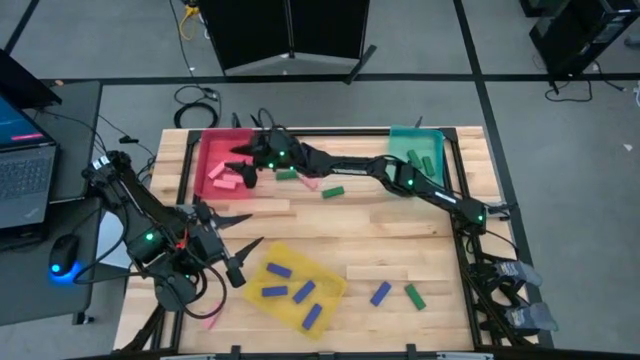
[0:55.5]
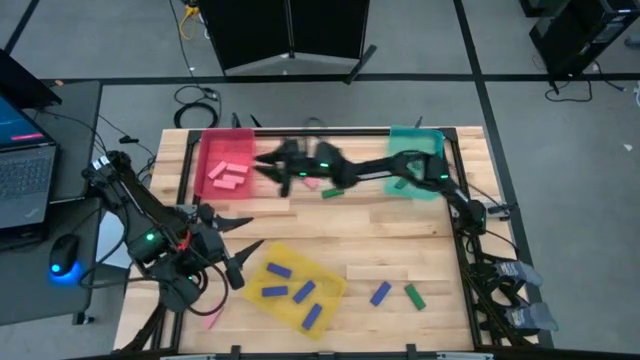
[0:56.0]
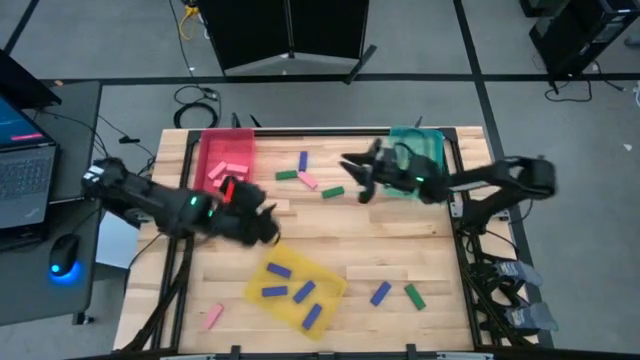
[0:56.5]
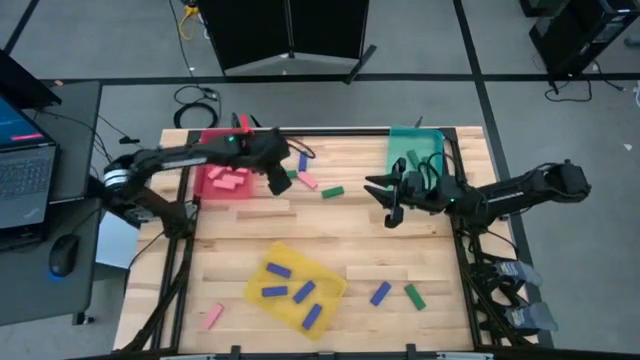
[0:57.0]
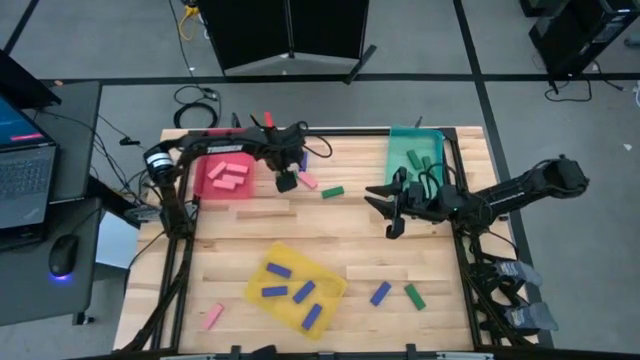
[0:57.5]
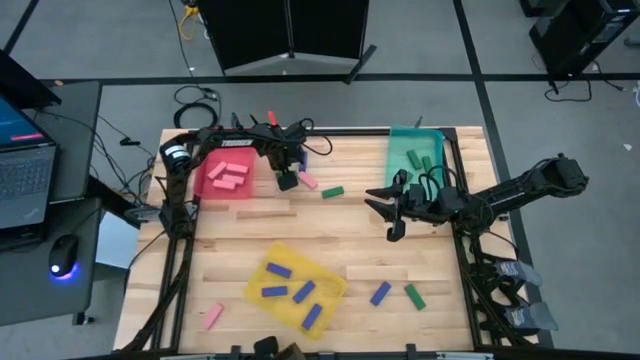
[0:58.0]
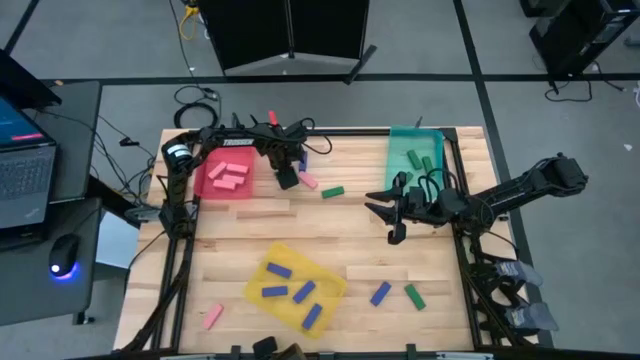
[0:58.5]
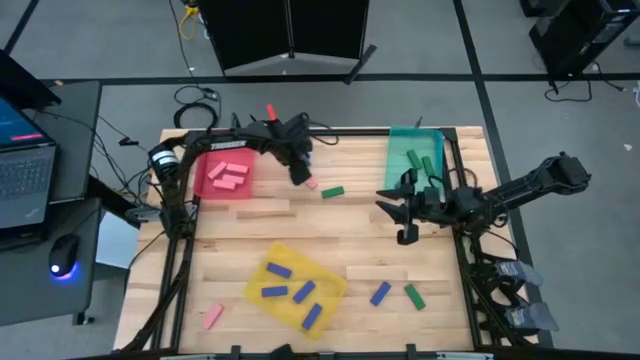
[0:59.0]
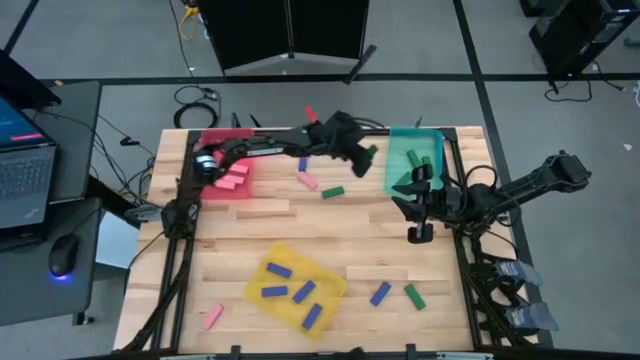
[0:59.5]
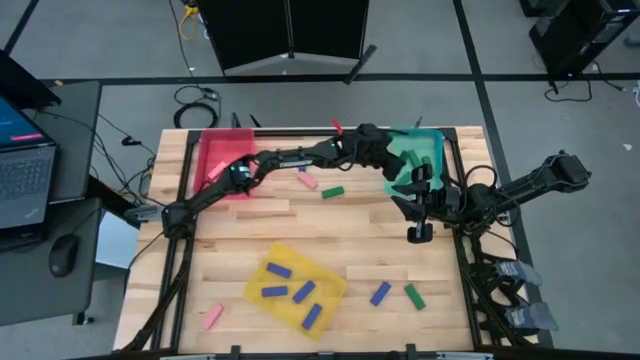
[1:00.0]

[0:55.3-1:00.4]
Task: Sort blocks
Put the green block into the blue bin

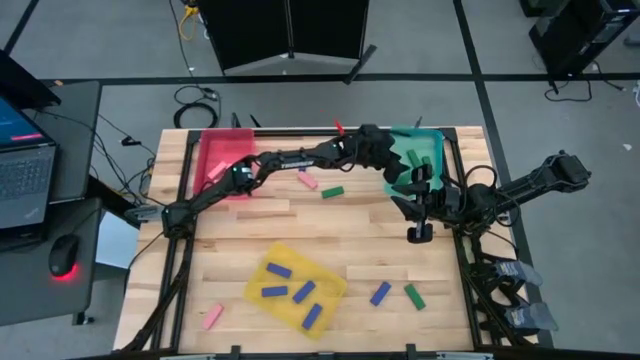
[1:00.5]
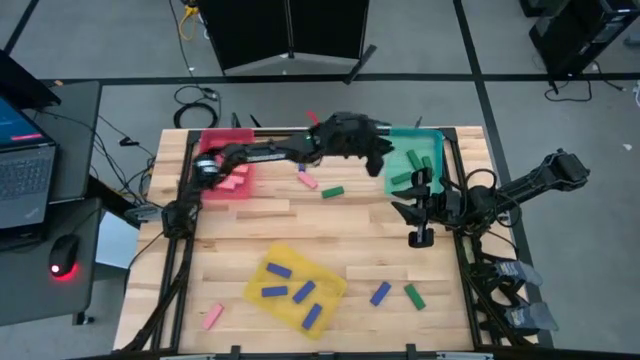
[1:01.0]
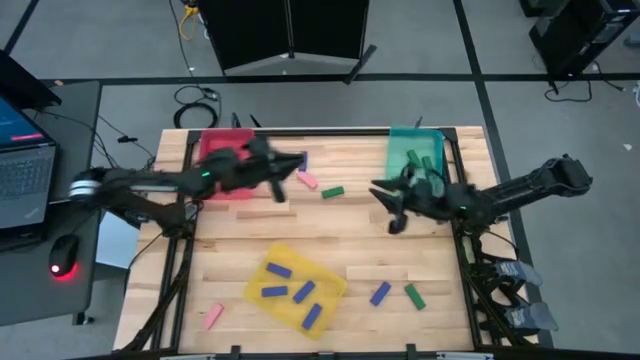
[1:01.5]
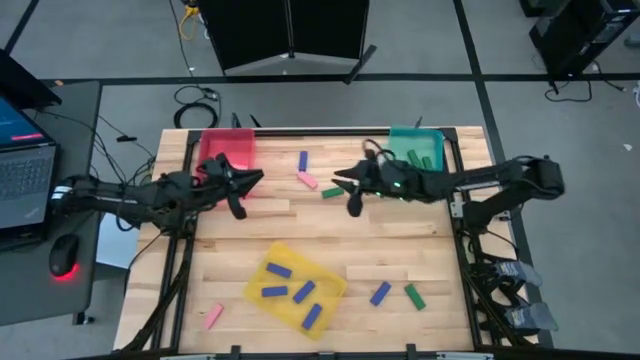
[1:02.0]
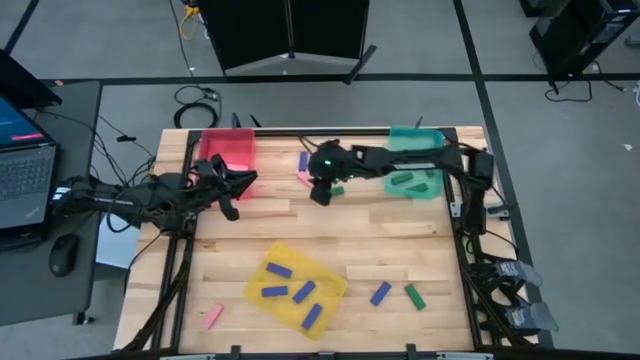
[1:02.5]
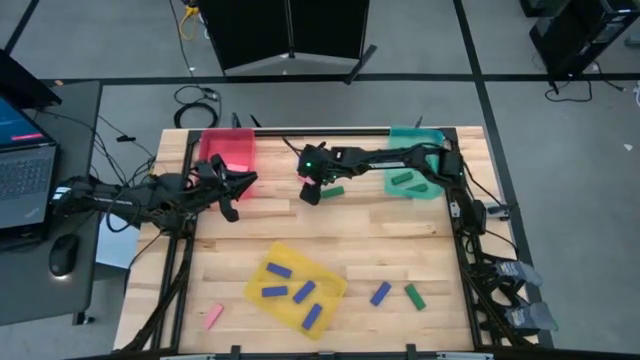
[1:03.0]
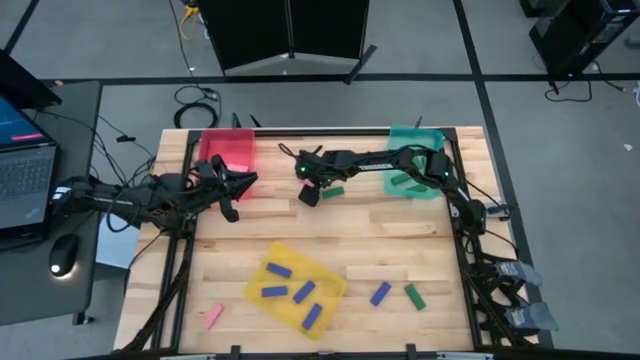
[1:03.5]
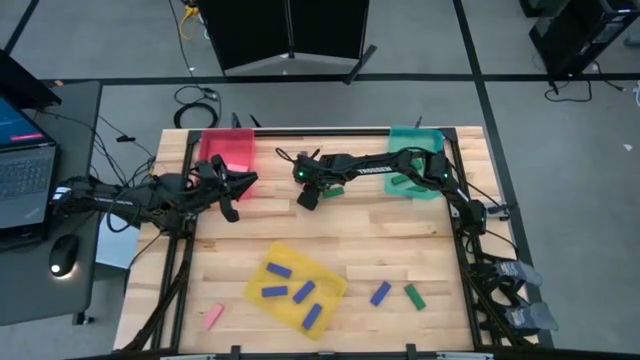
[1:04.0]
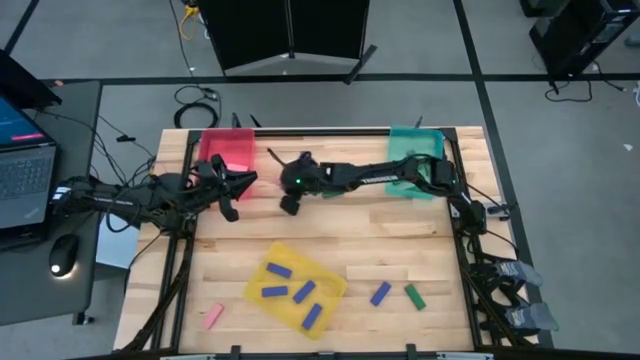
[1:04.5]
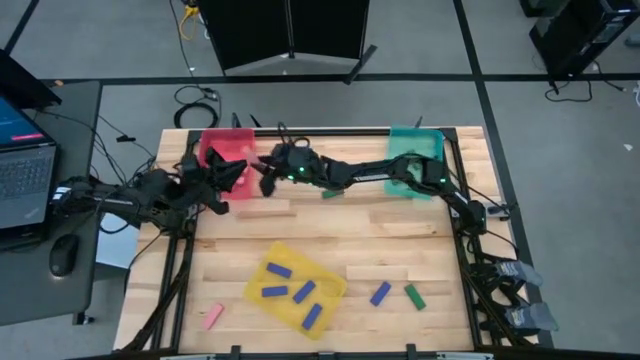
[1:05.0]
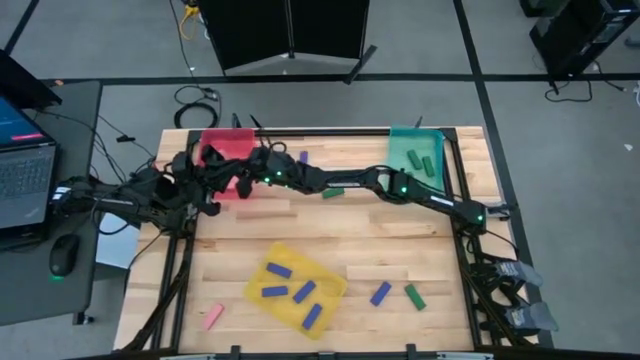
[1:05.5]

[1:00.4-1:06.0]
Put the pink block into the red bin

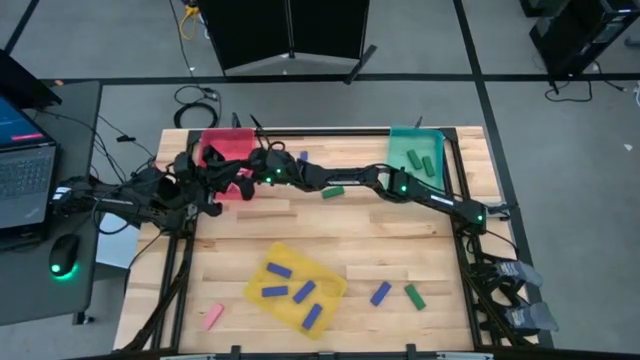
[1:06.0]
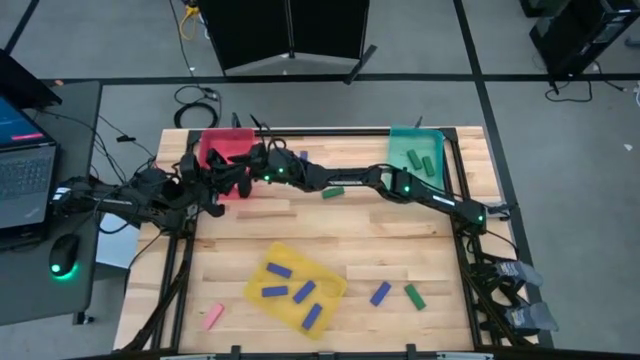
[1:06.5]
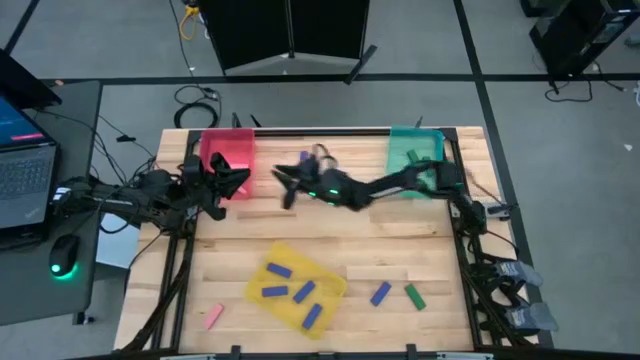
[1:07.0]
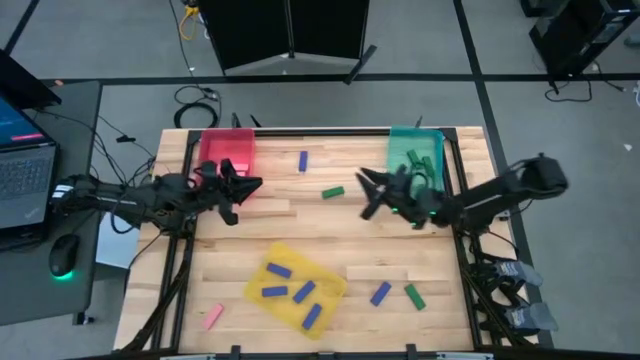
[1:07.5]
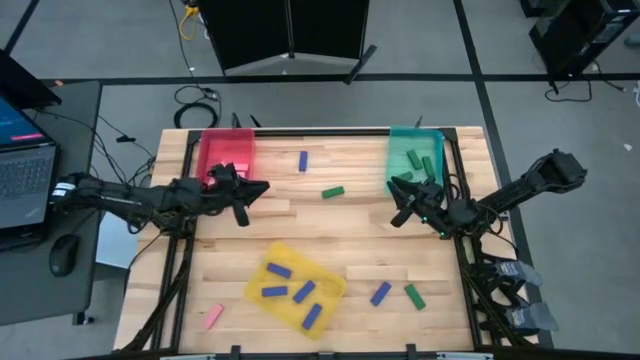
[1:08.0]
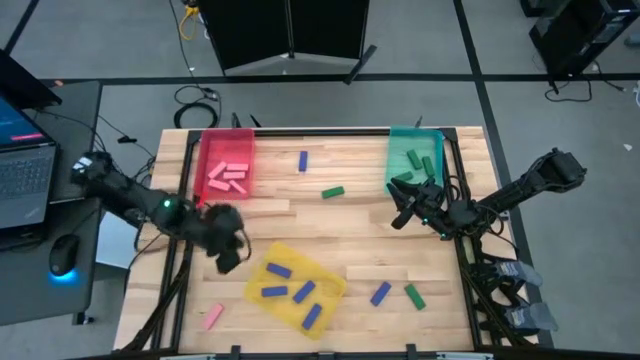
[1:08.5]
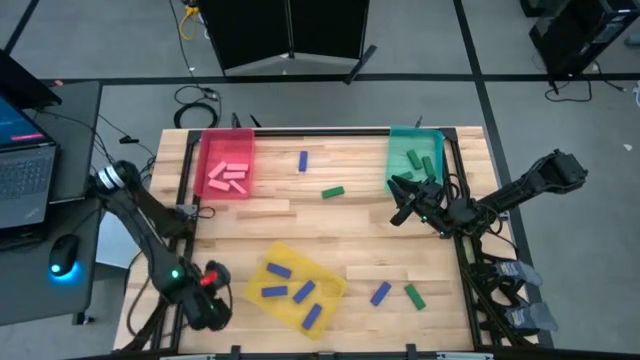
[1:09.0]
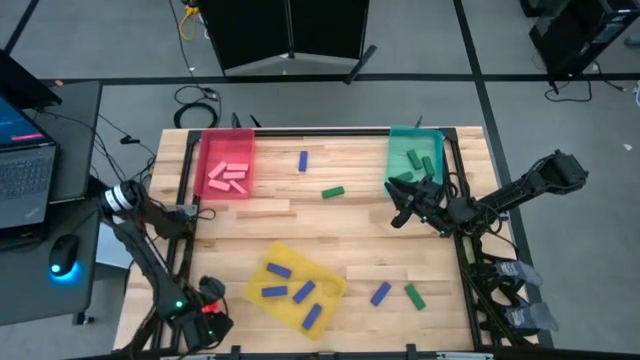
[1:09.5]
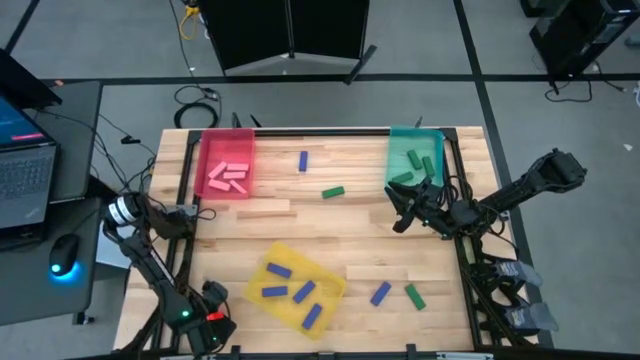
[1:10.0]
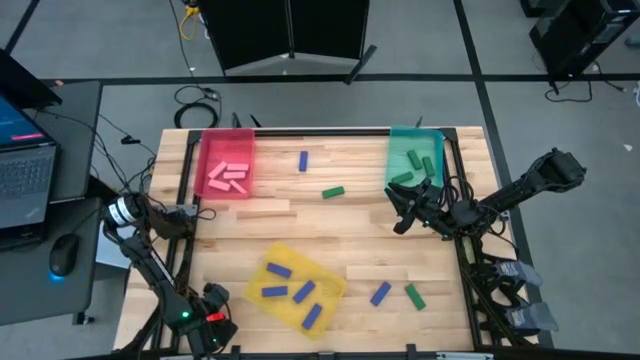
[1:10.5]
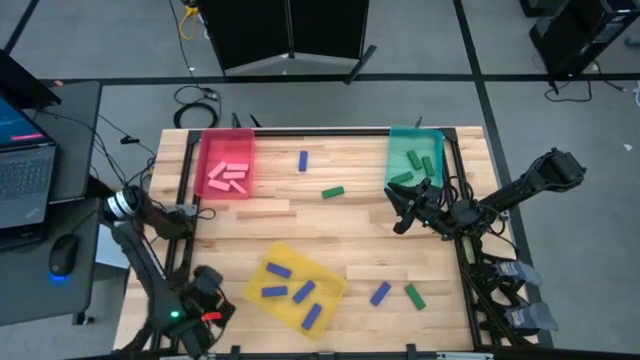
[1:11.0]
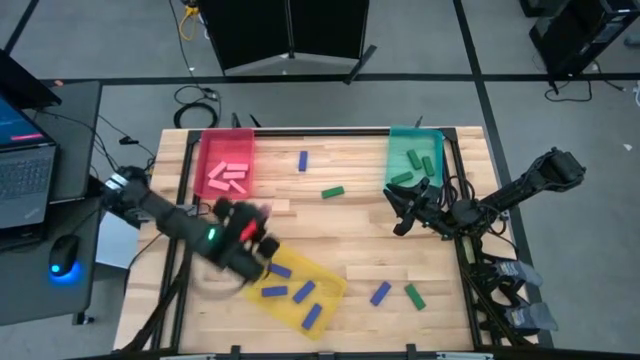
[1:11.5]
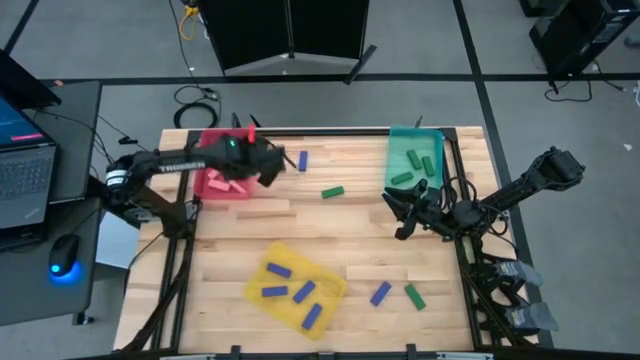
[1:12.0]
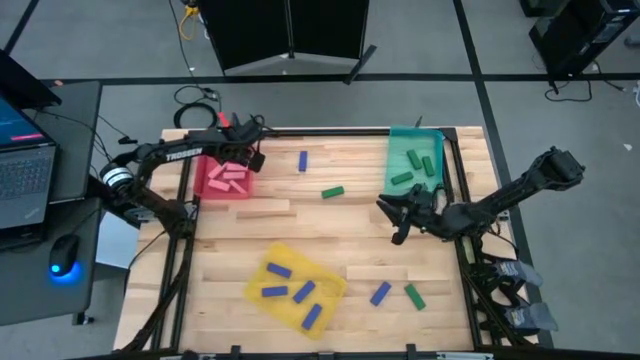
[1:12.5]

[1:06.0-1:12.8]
Put the pink block into the red bin

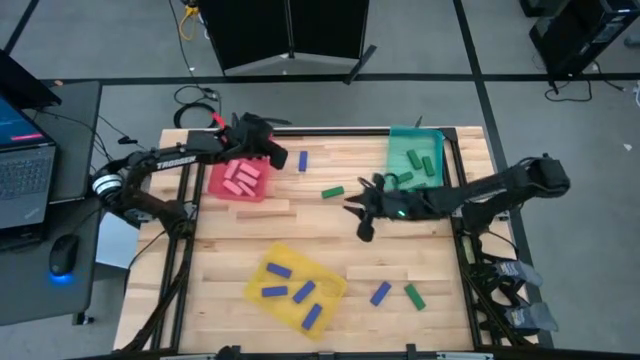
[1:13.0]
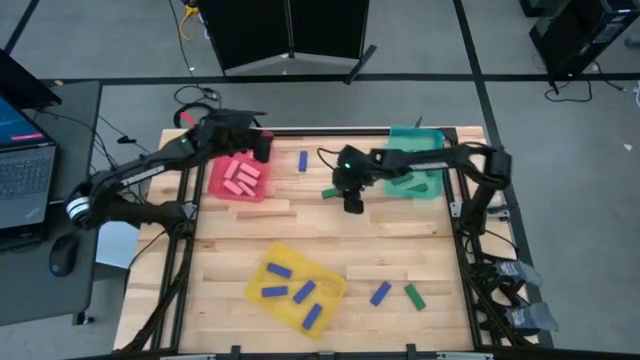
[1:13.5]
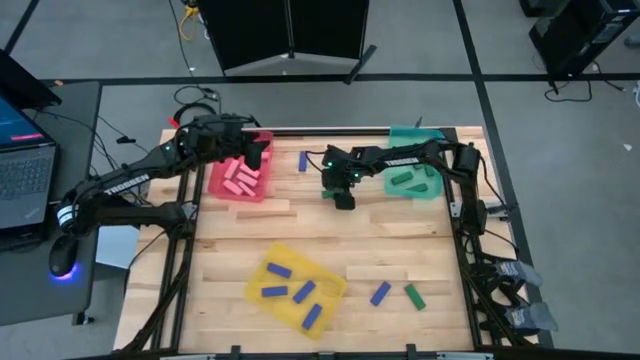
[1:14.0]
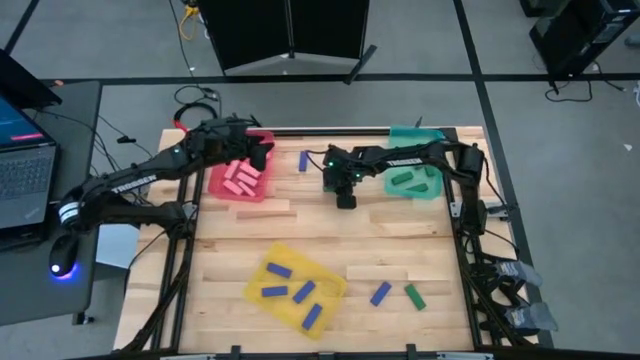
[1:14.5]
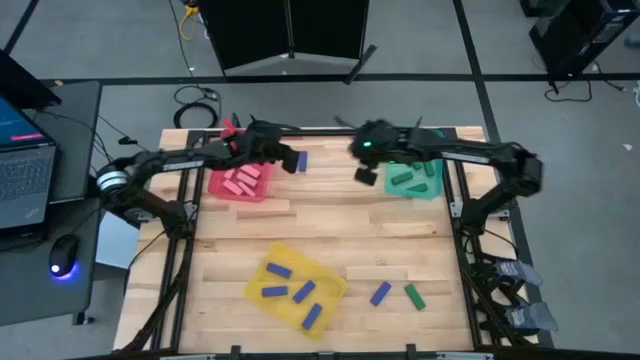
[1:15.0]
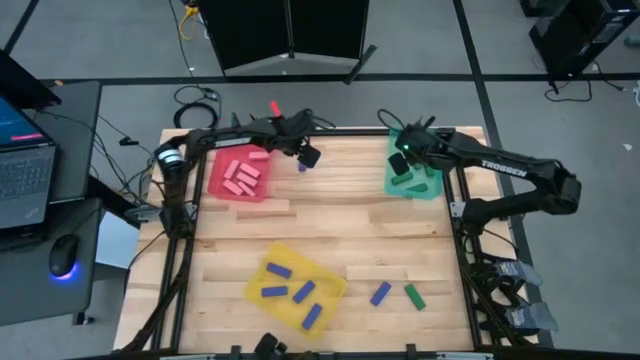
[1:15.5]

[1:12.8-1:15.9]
Put the green block into the blue bin

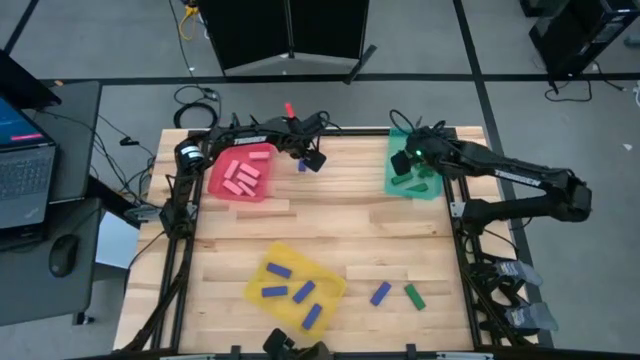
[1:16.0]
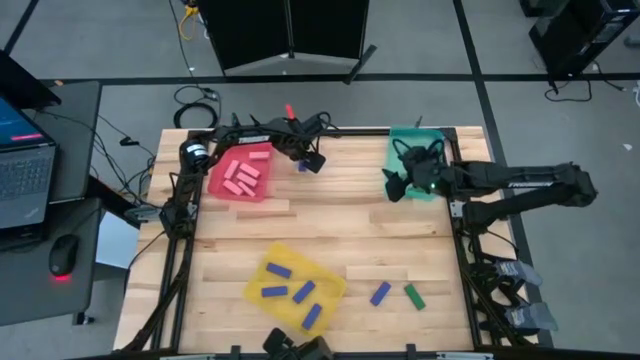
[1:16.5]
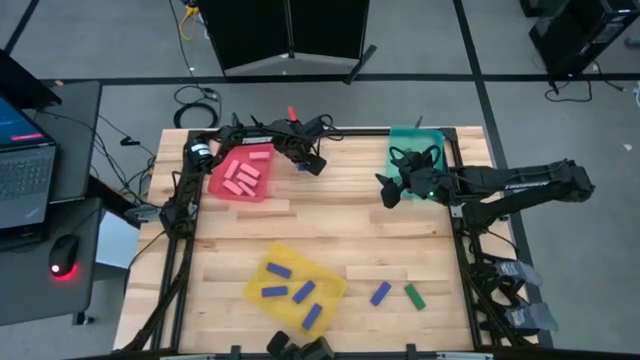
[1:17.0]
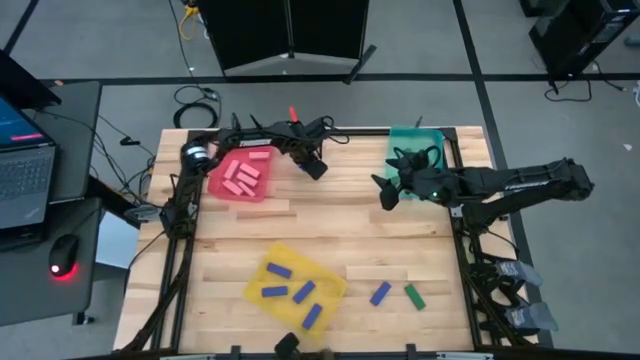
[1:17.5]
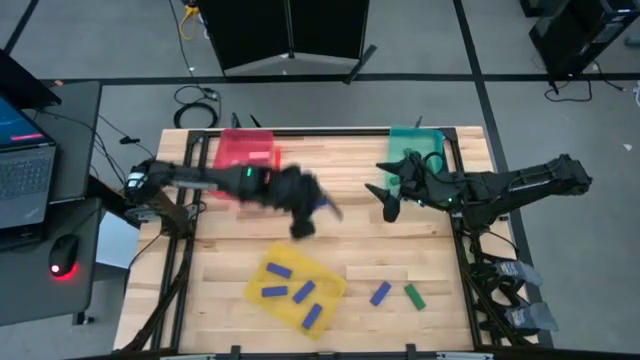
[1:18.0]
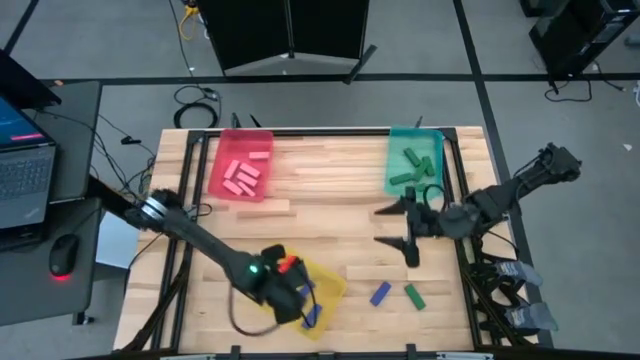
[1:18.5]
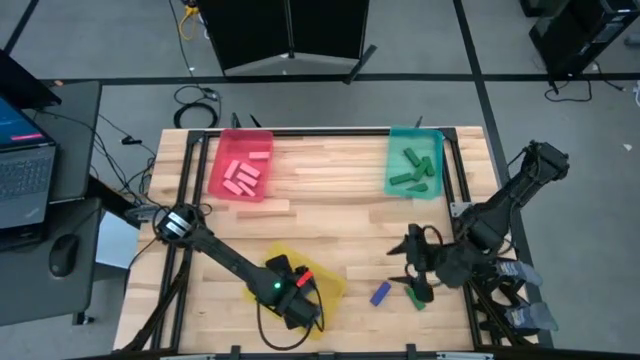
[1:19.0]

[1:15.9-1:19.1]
Put the blue block into the yellow bin
